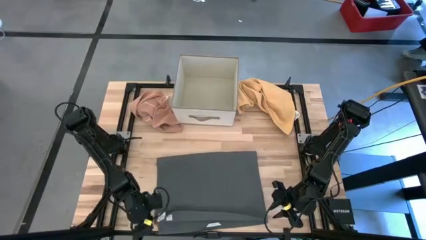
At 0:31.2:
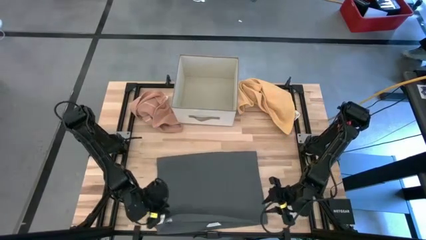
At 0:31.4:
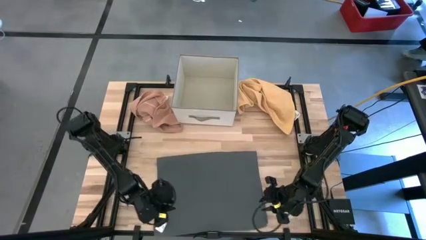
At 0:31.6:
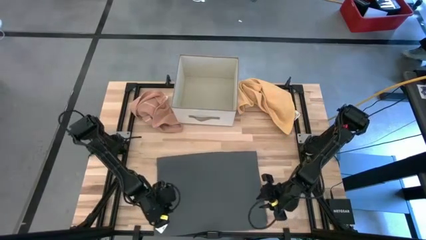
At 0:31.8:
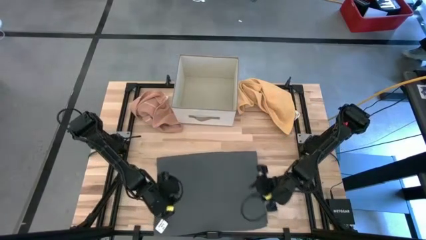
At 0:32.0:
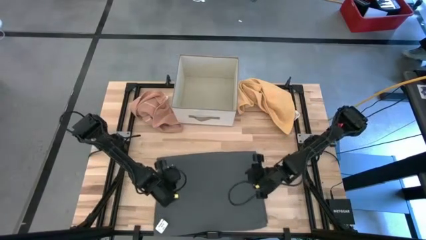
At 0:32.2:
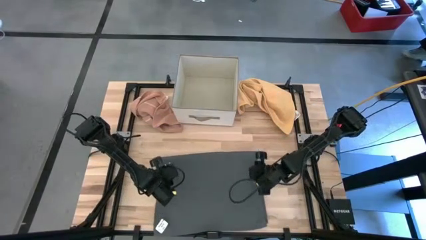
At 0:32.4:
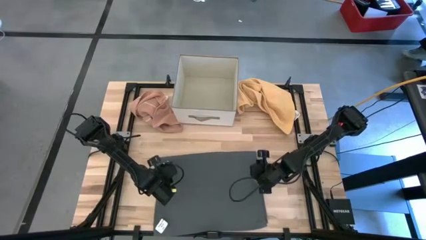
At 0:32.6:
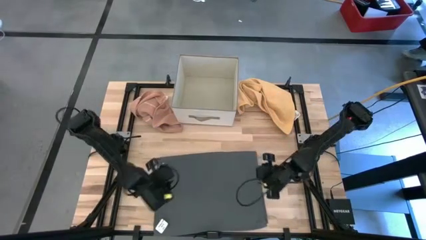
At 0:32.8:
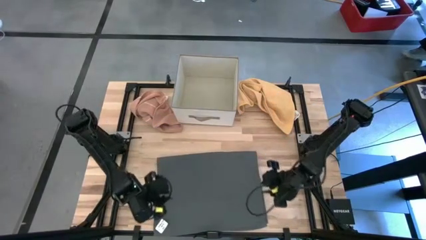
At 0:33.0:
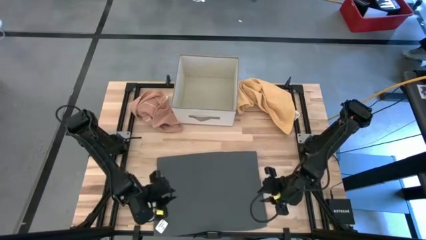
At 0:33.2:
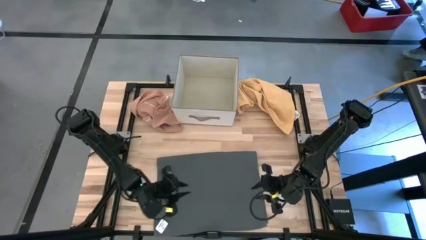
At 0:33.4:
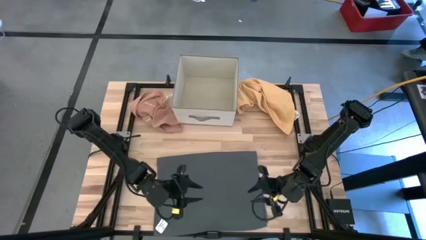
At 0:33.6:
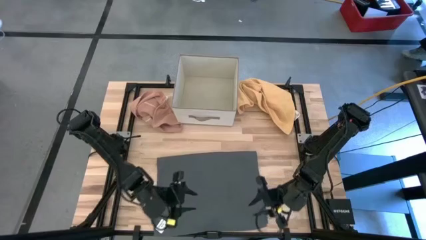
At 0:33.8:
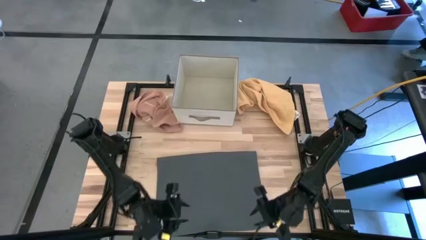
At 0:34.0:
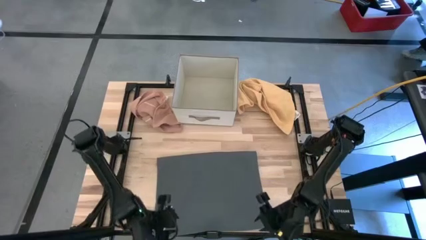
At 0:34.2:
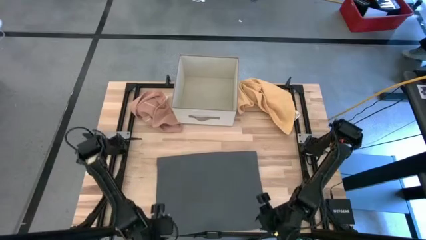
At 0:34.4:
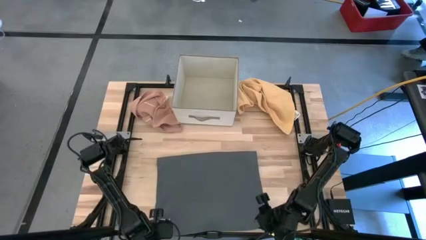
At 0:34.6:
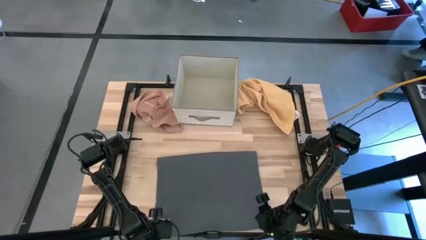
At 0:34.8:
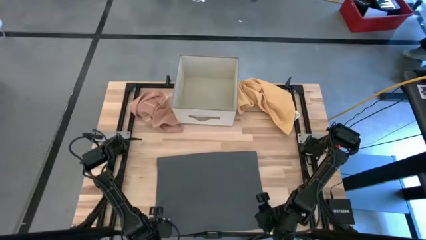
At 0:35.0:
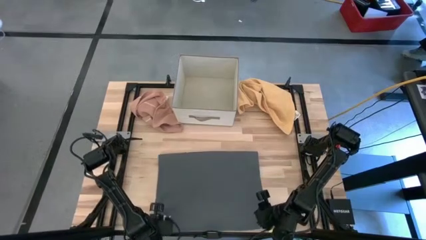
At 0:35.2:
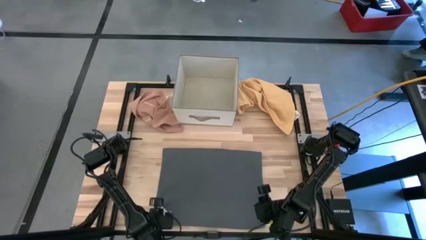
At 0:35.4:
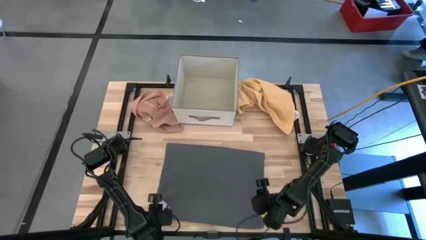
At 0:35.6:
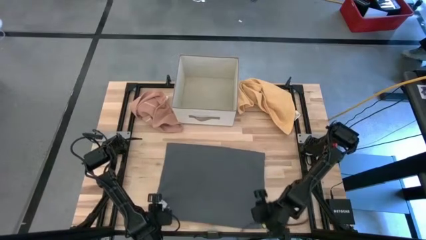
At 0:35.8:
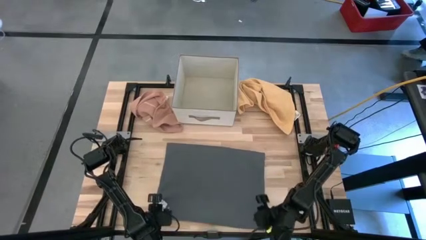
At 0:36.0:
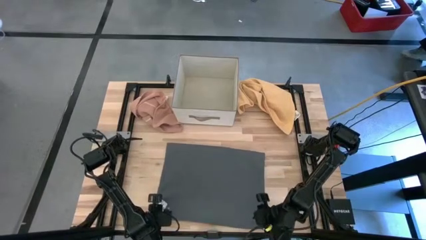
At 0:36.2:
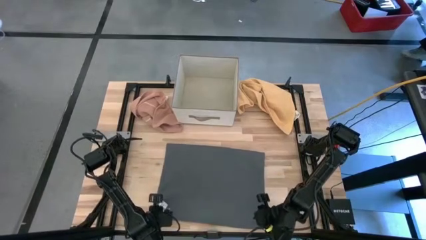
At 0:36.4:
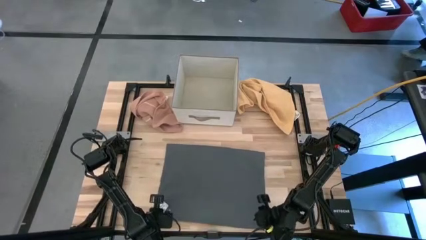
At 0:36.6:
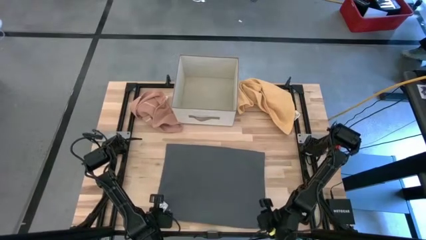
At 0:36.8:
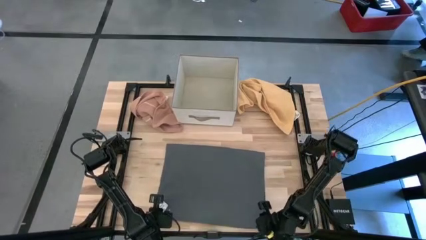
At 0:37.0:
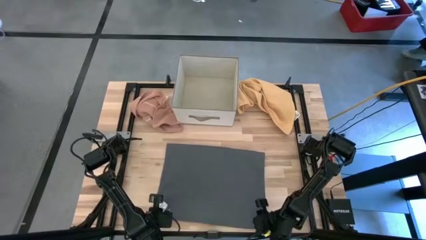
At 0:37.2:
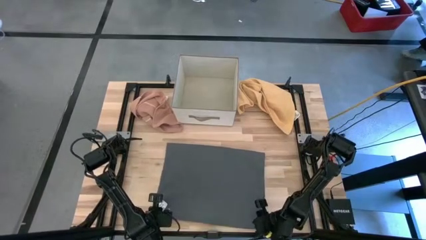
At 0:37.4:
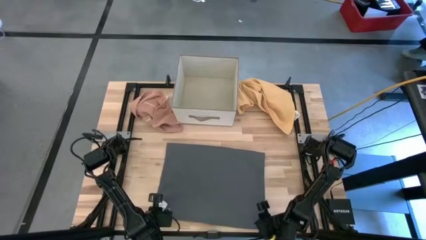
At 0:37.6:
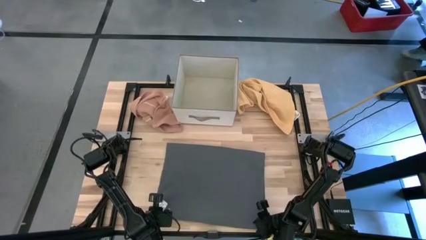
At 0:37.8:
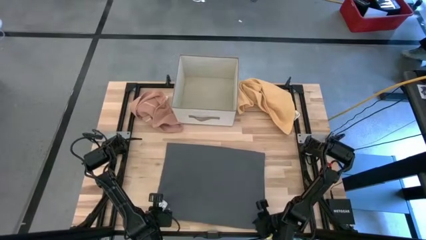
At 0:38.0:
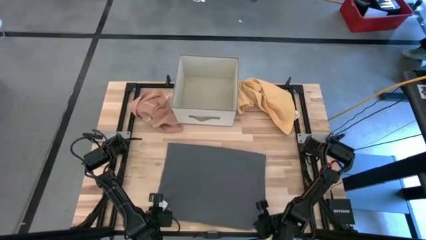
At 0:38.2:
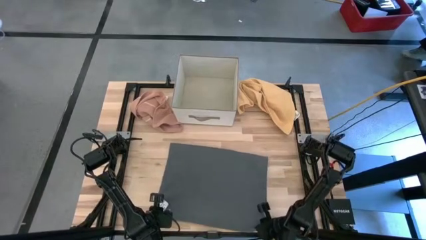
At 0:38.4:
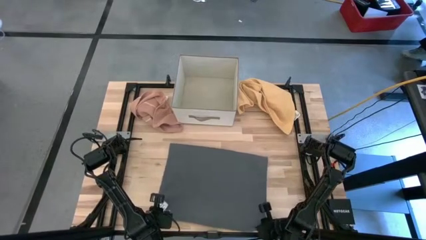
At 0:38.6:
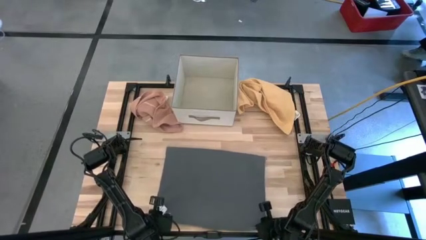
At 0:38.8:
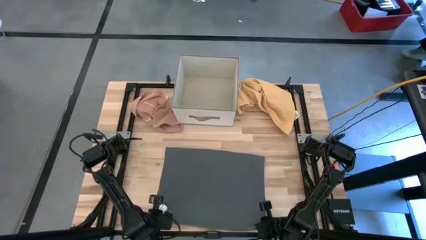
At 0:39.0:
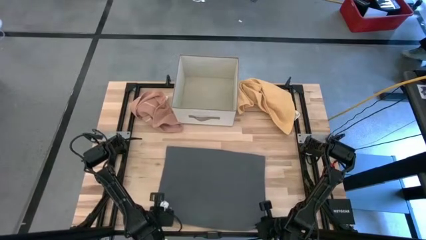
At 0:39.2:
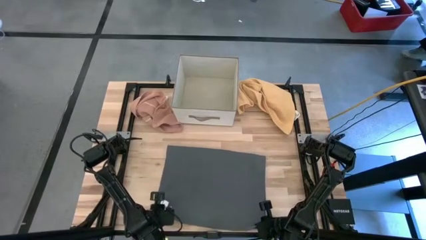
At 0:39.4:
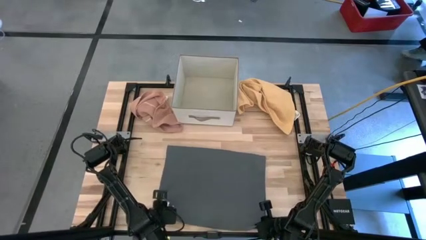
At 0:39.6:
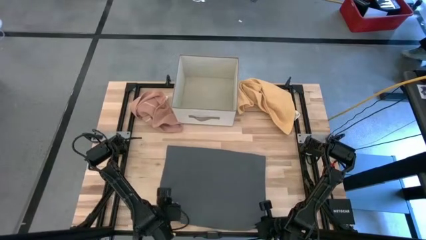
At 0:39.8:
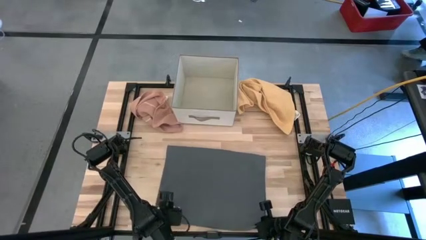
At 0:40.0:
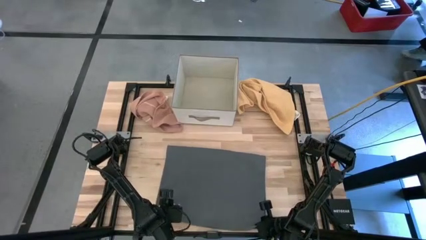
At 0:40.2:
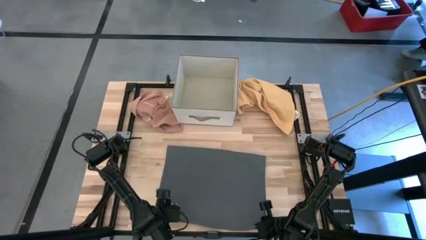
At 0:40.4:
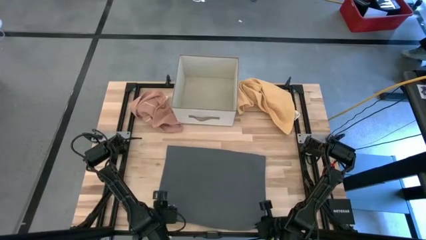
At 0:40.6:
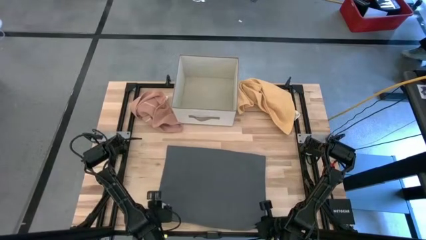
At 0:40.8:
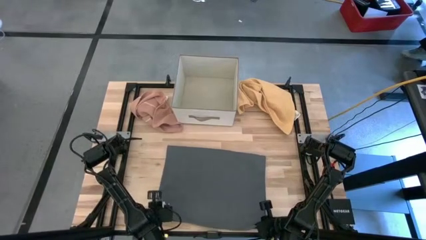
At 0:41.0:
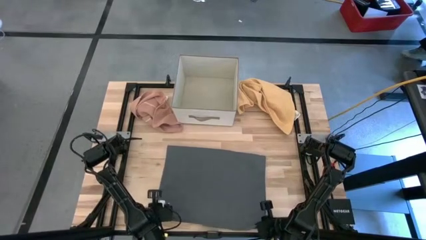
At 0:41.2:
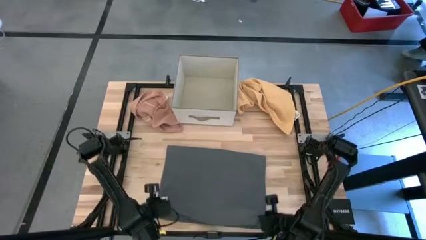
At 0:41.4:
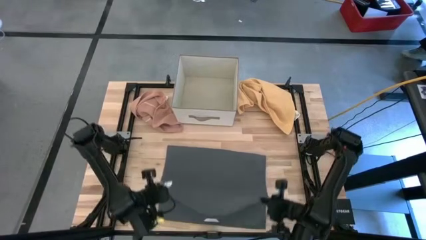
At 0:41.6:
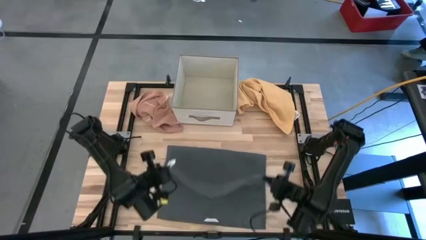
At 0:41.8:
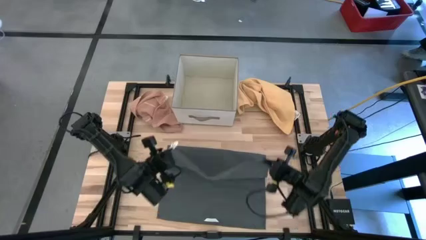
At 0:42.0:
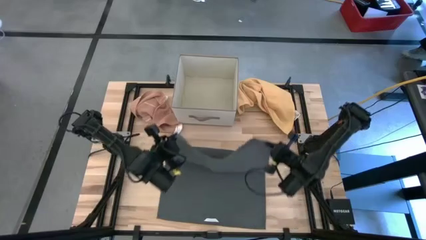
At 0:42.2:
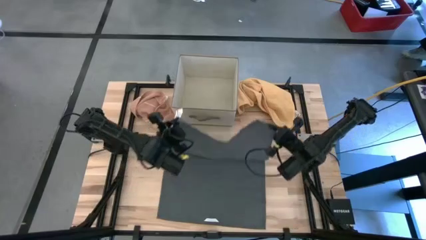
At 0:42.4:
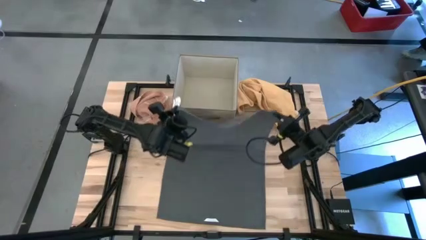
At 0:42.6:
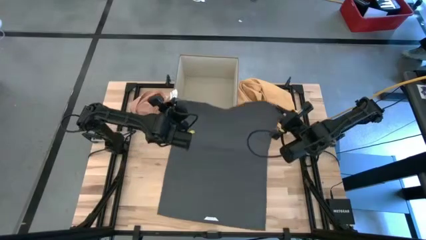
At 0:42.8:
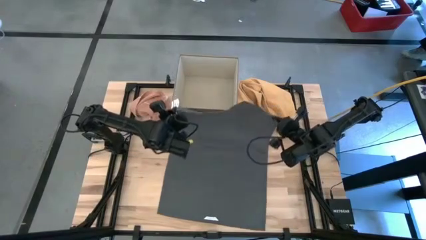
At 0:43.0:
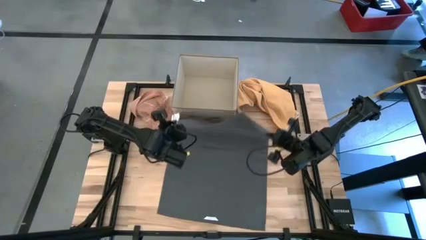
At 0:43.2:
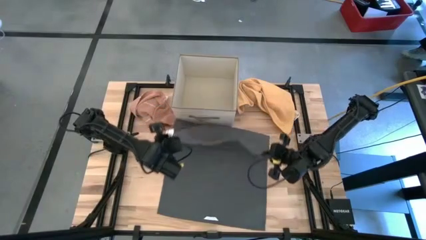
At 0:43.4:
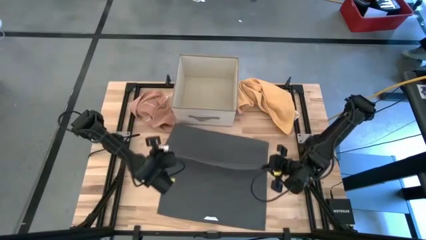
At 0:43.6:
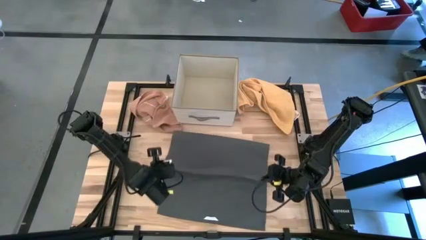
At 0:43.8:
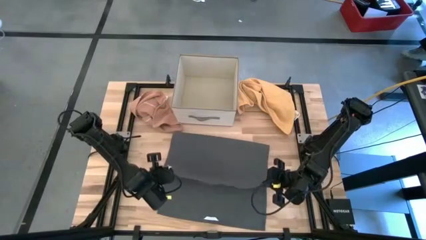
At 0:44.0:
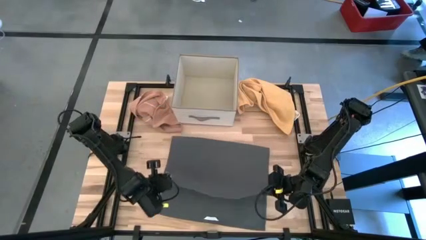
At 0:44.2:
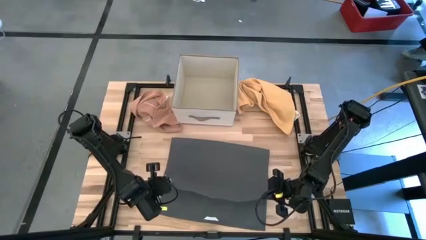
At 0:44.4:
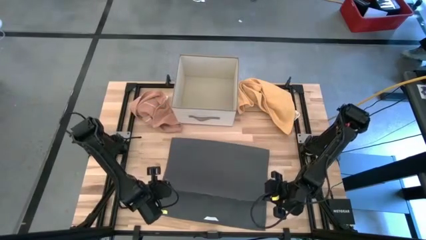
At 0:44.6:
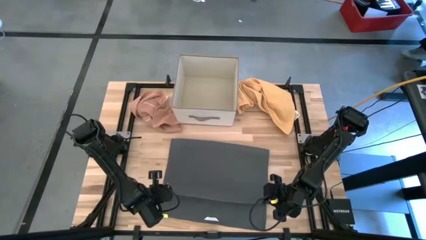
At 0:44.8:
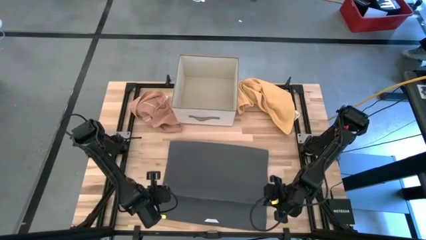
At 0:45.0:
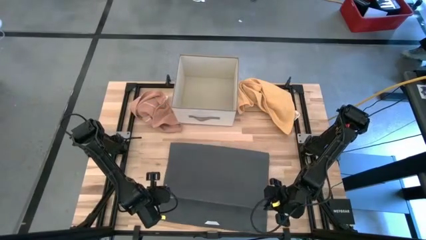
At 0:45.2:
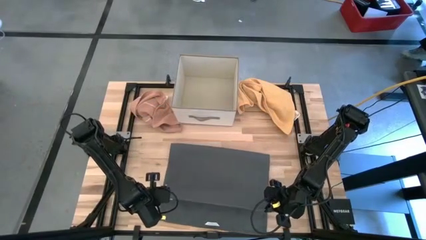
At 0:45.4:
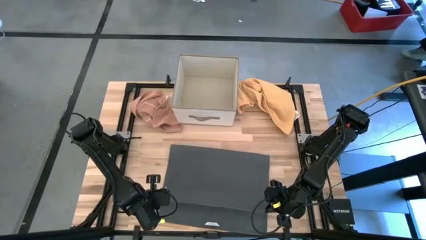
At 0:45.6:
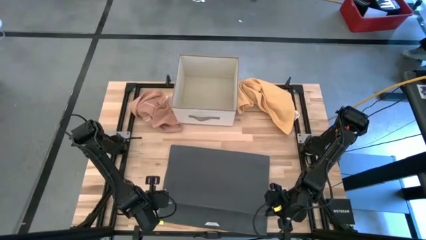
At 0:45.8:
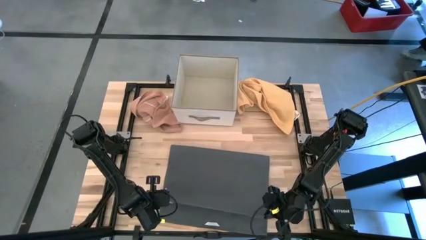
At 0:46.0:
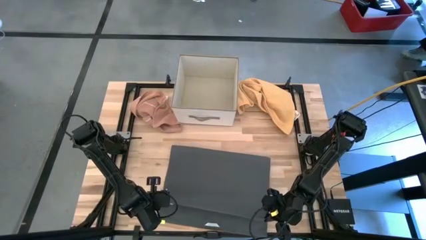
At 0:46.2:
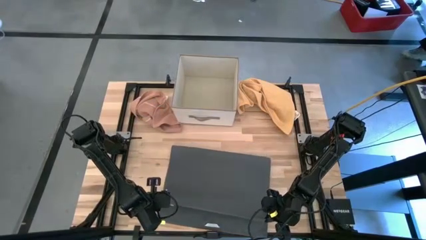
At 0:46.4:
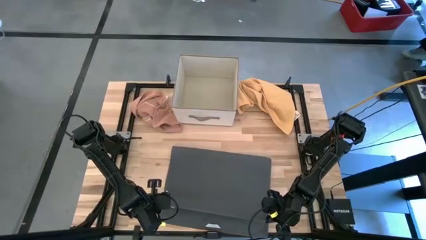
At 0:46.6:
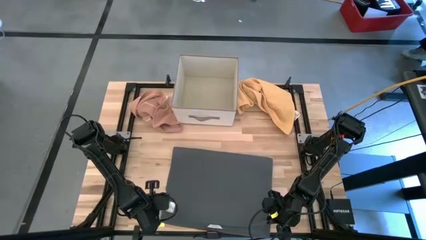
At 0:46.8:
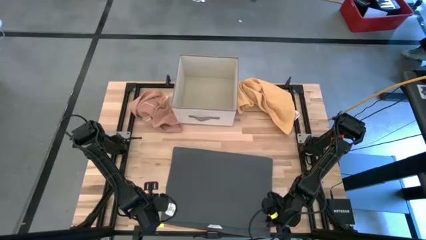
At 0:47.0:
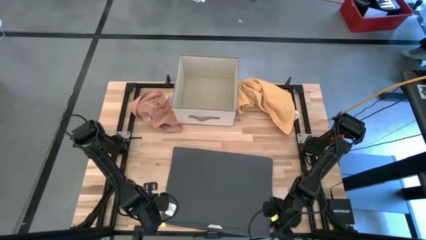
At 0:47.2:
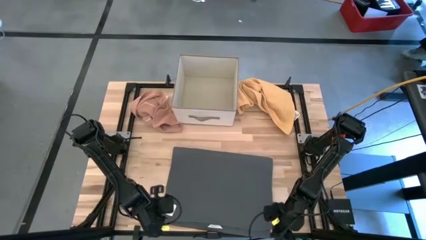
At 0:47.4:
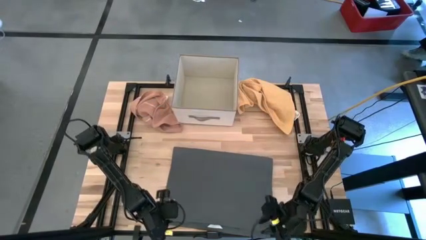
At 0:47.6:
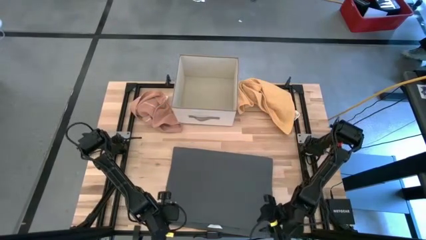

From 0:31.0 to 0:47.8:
Task: Fold towel
Fold the dark gray towel
